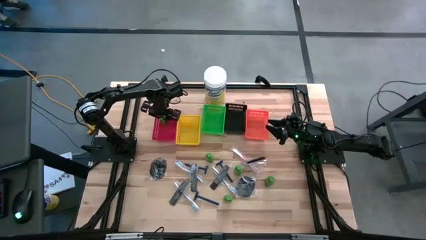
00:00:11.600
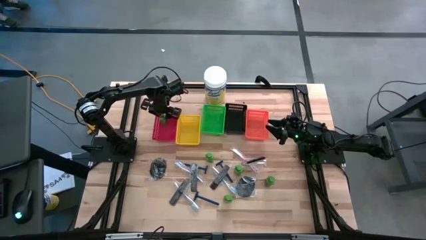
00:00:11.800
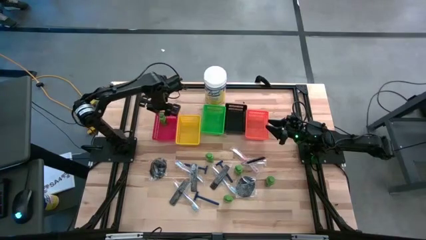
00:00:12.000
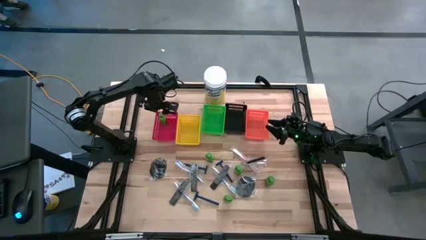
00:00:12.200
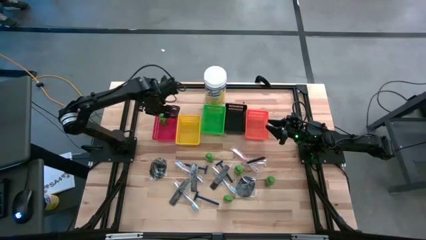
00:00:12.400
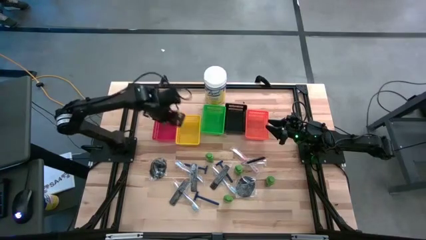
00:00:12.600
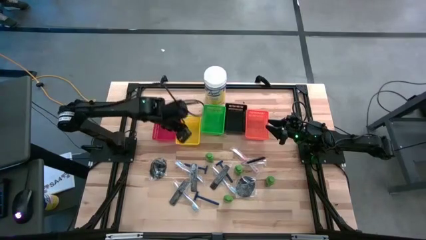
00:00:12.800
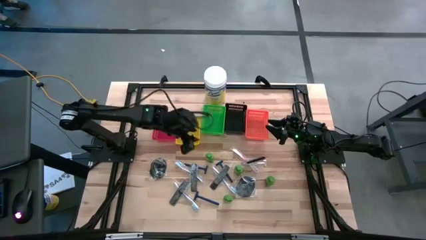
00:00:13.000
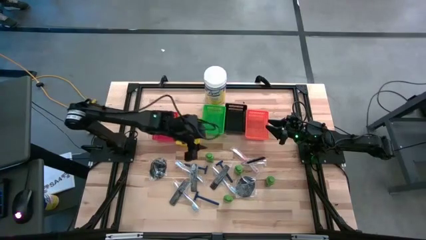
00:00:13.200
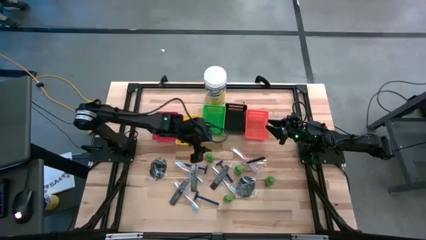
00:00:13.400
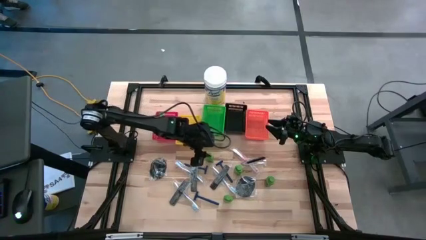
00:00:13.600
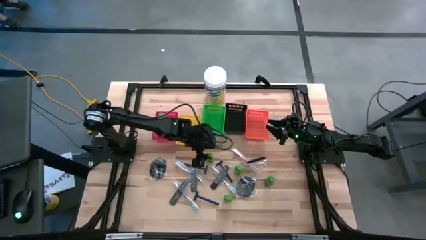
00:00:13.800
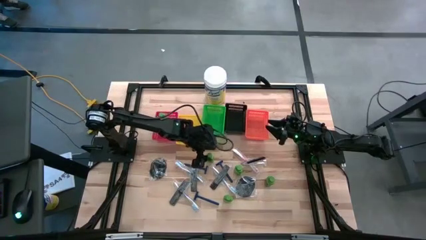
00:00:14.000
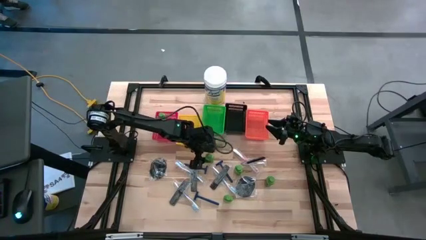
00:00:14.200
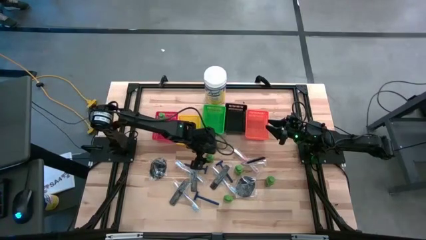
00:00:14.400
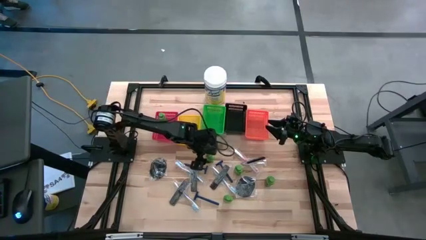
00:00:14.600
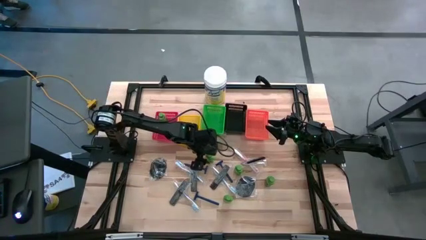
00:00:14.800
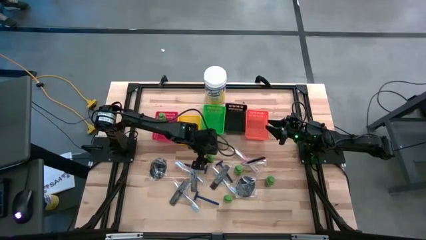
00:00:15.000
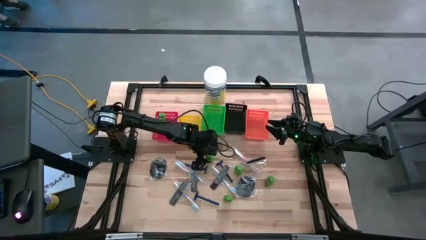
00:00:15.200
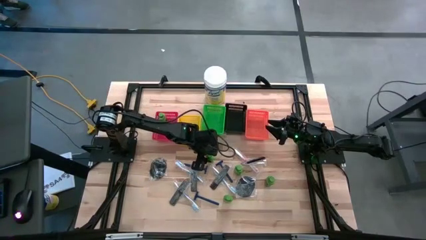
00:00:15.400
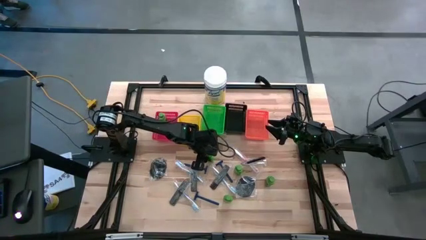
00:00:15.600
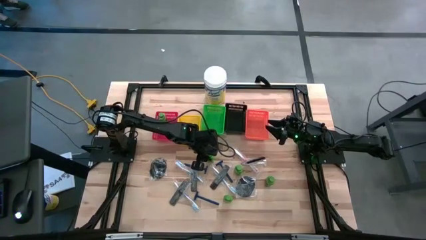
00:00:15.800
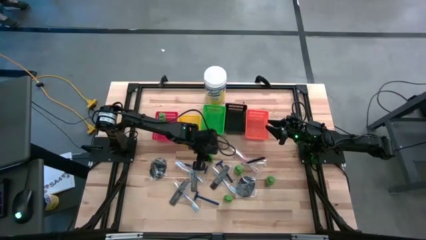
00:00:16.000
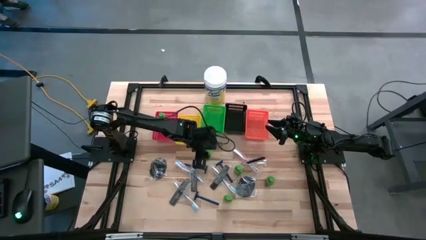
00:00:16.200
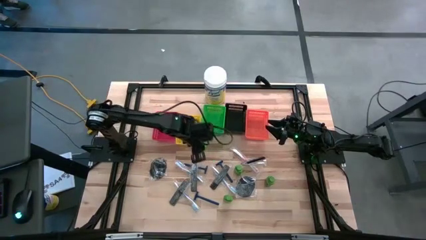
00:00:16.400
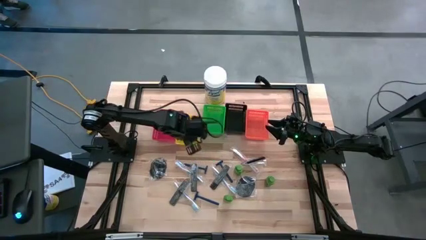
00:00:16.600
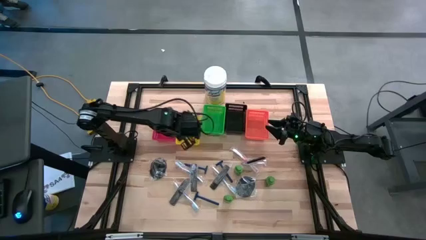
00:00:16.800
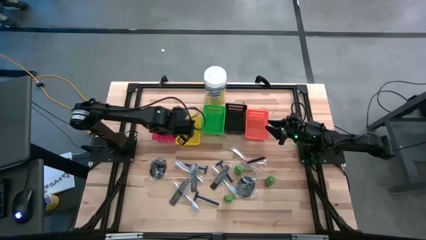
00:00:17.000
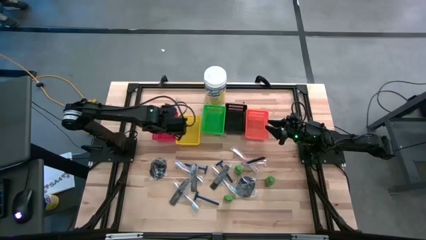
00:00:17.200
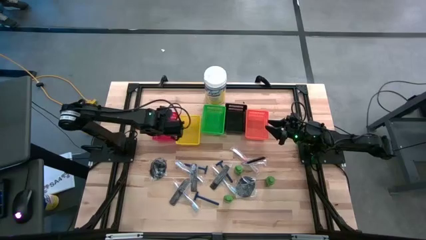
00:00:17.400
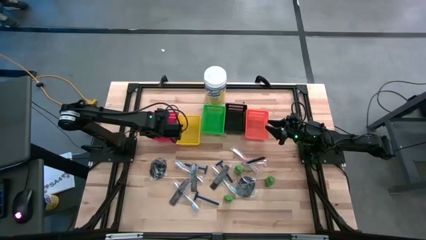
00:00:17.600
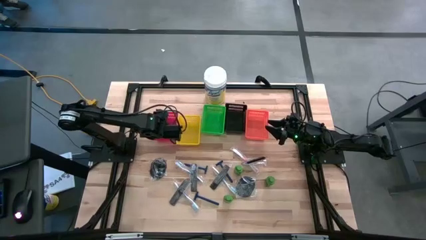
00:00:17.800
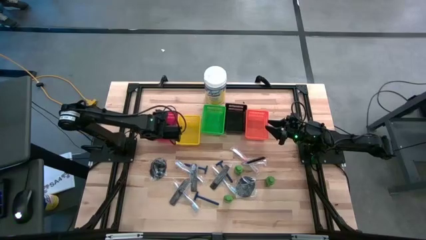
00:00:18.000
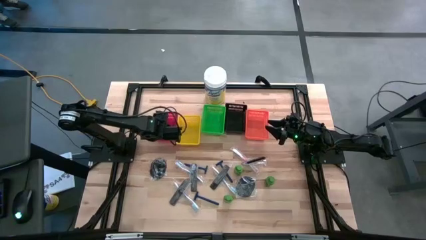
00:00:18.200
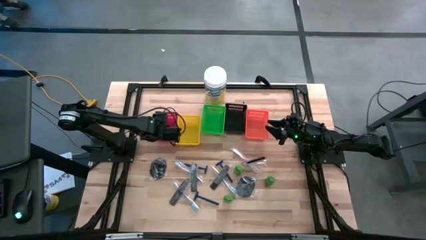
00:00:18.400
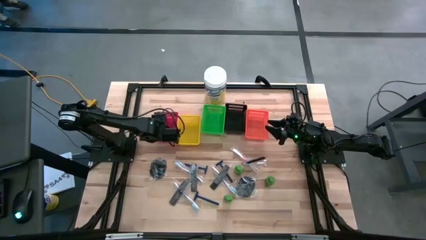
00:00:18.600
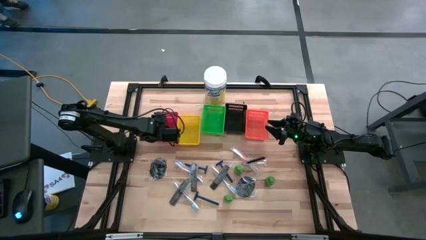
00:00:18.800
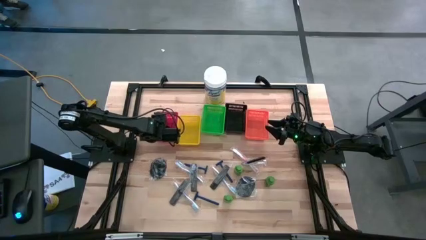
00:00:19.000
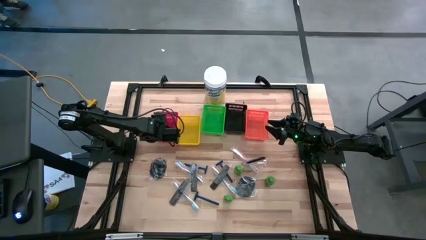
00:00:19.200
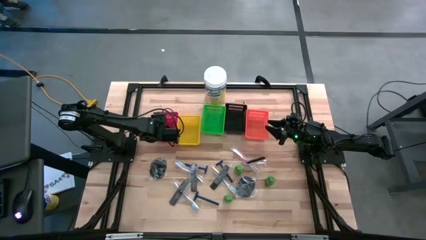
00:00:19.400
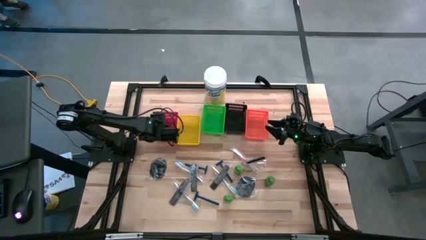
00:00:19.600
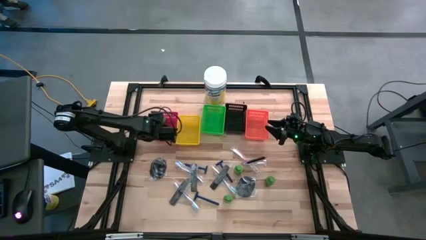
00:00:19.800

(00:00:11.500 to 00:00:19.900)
Task: Pick & Place Travel size toiletries
Put the green shampoo bottle into the red bin

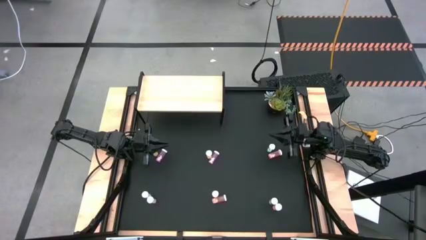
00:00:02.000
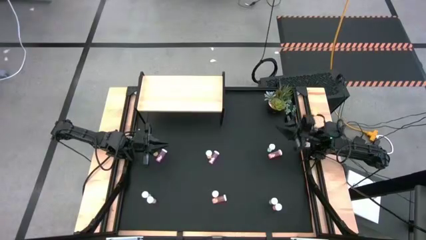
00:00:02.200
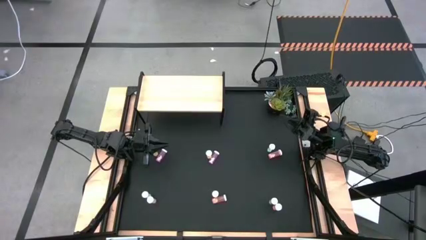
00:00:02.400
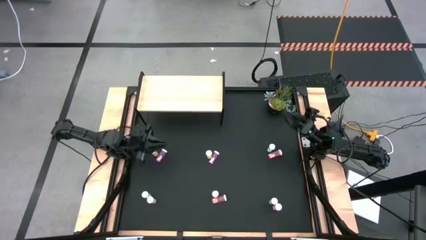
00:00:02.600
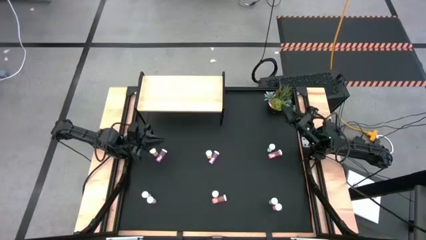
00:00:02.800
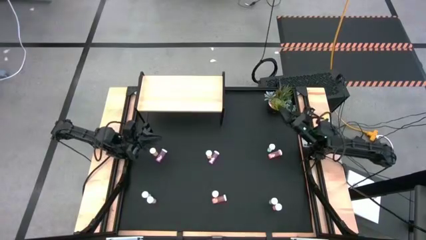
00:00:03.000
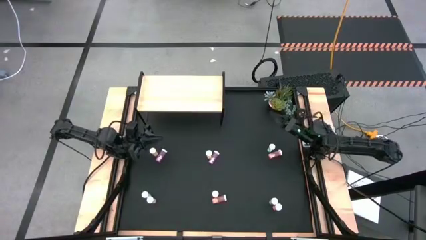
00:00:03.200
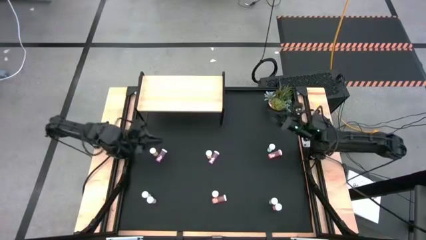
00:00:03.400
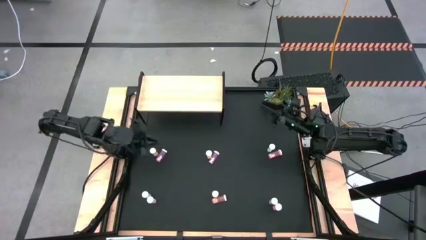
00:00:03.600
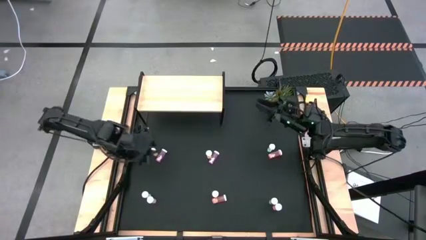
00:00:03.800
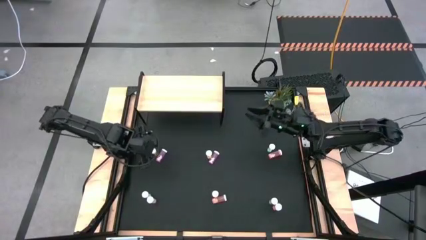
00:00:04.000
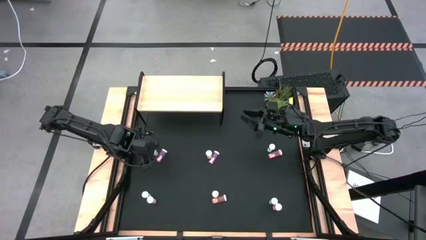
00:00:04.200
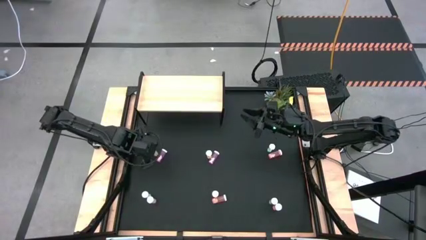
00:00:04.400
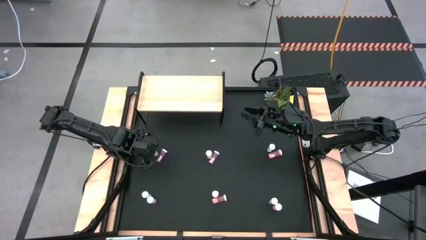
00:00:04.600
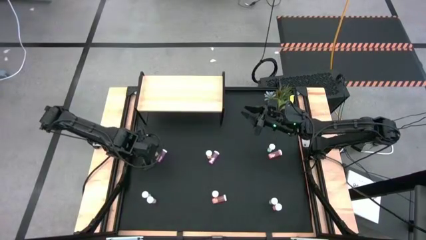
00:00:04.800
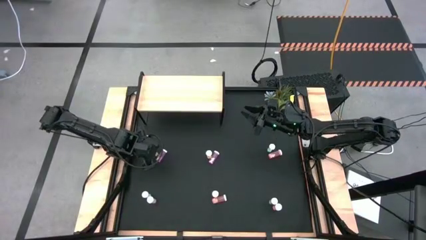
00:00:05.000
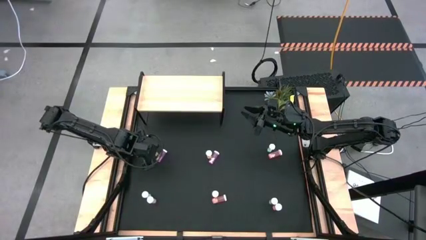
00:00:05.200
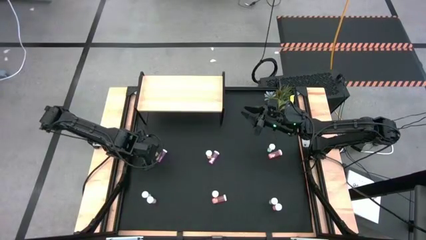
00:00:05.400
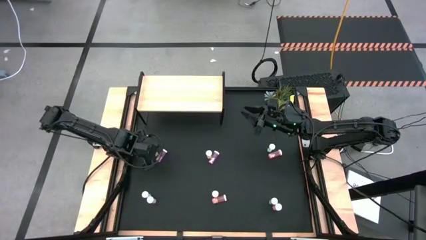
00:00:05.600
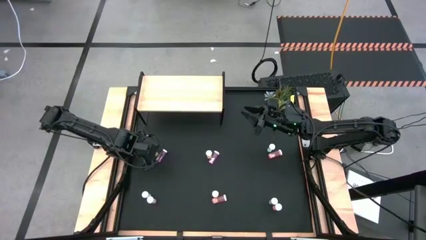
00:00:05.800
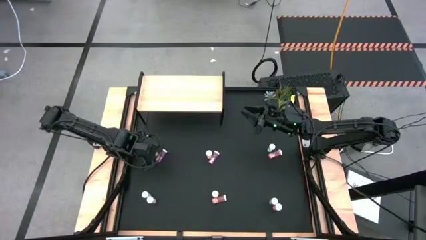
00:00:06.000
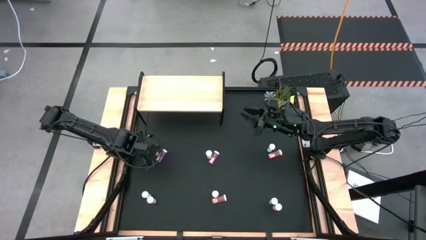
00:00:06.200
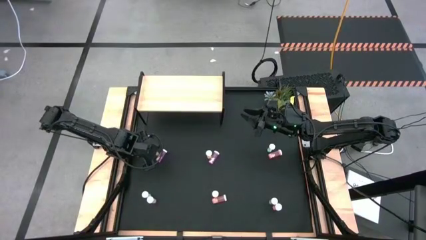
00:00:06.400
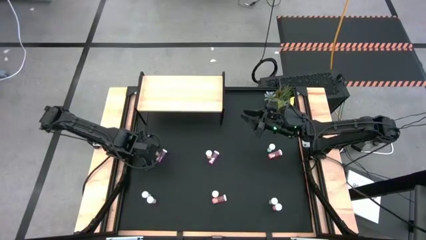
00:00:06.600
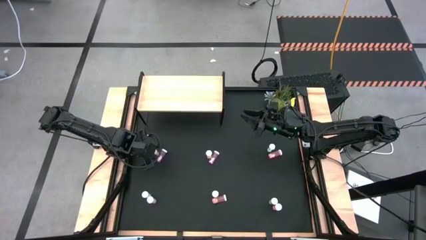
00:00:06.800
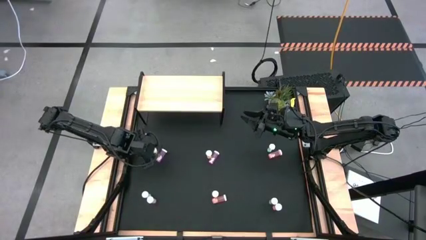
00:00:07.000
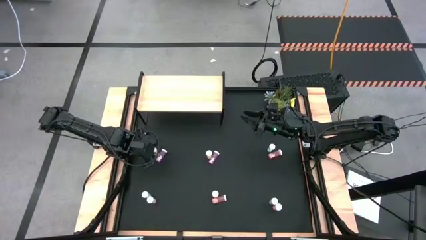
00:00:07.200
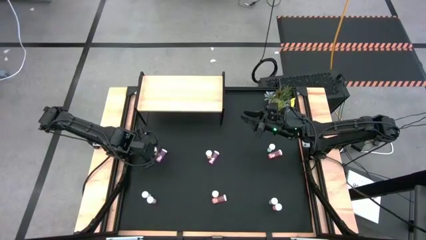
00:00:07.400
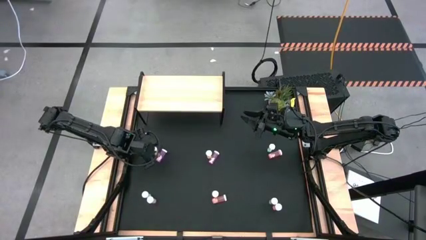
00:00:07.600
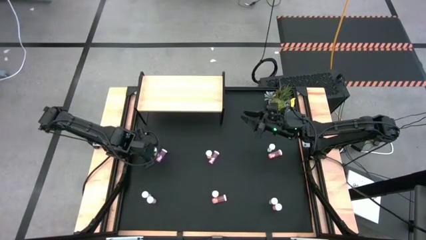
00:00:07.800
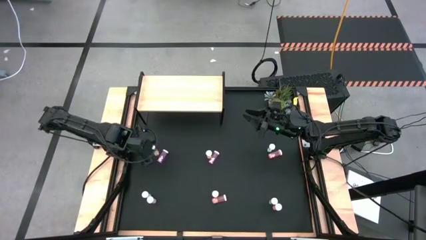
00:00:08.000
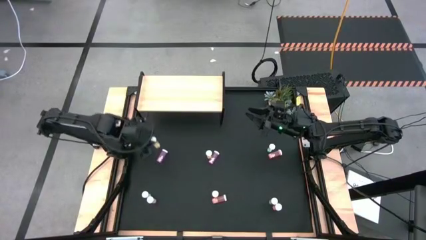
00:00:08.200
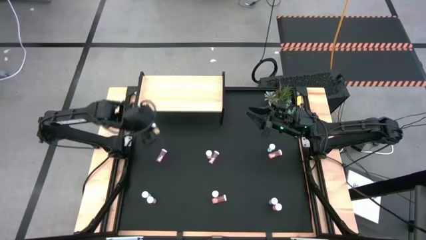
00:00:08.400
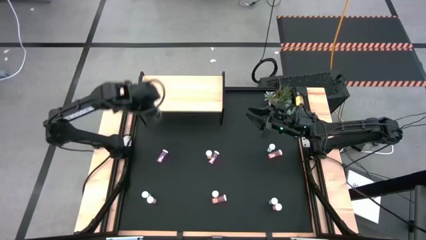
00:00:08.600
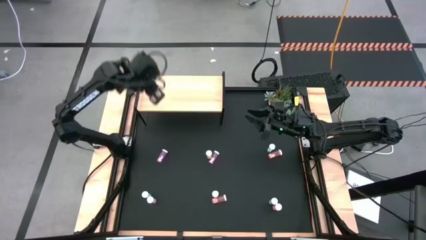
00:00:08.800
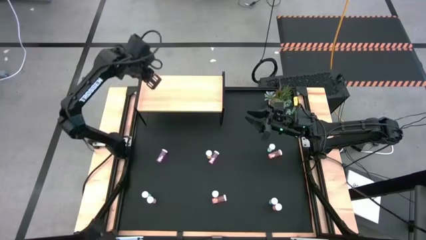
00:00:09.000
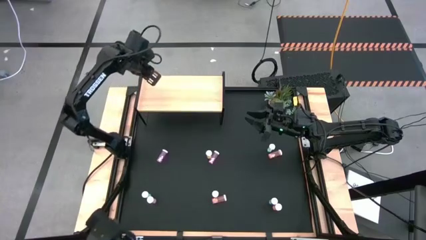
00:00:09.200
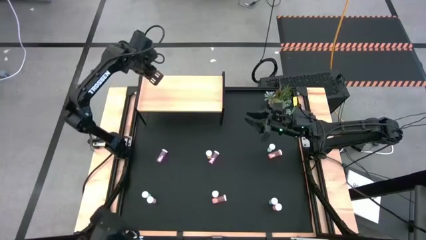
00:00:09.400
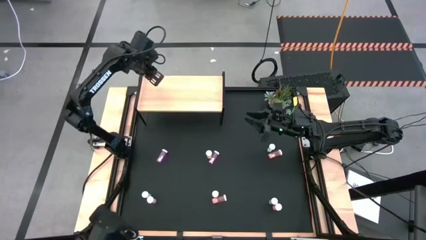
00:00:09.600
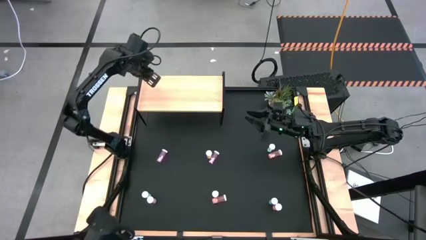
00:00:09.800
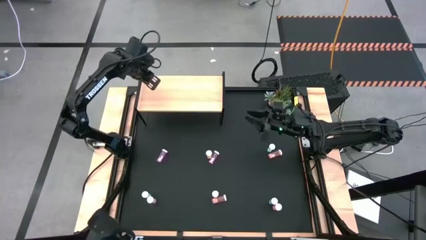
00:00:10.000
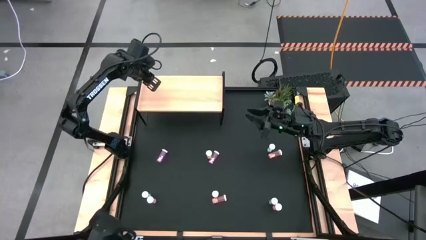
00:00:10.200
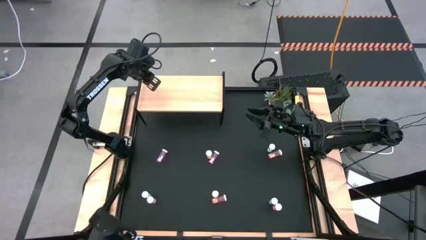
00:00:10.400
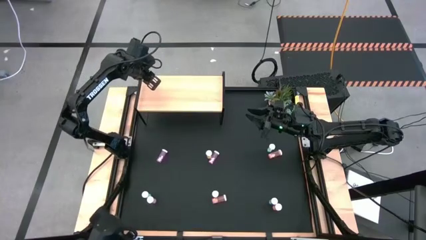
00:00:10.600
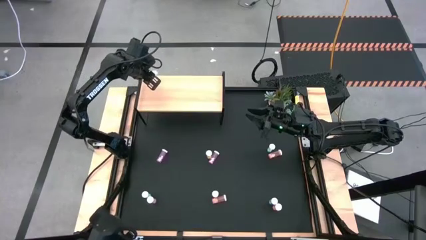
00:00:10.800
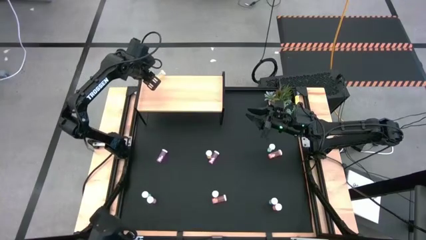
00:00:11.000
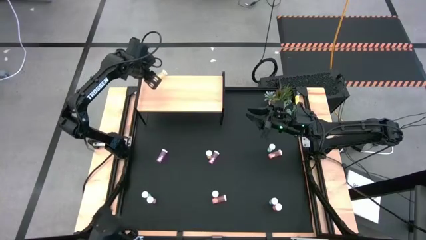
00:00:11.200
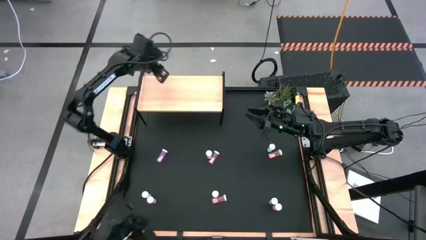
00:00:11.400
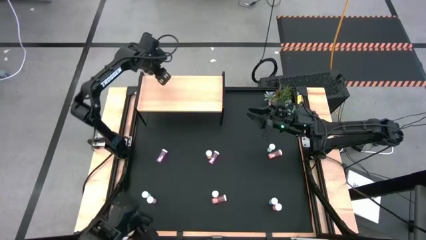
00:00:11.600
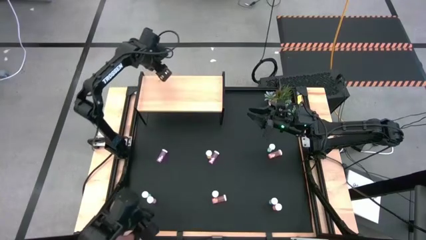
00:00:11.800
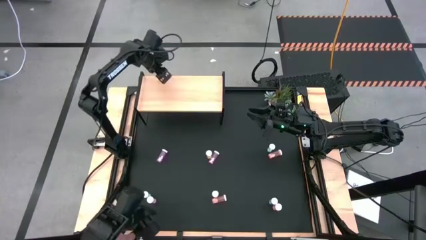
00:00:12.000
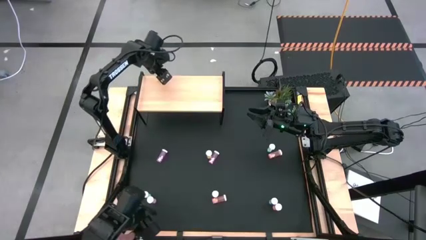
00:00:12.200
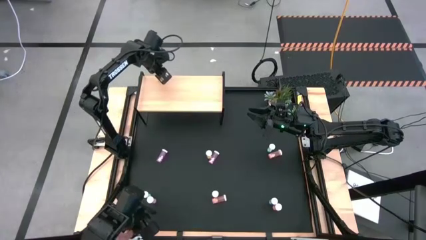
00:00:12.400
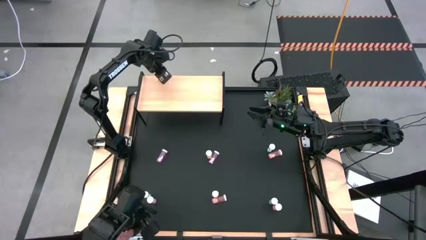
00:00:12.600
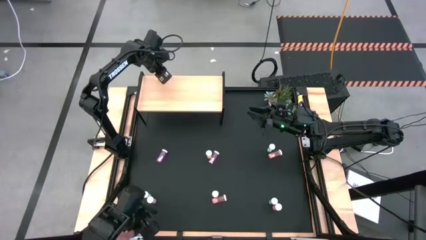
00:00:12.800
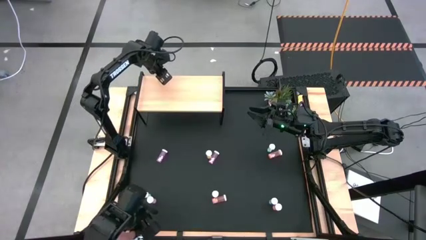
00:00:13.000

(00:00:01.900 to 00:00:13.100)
Task: Pick and place medicine bottles onto shelf by color
Put the top left yellow medicine bottle on the shelf
